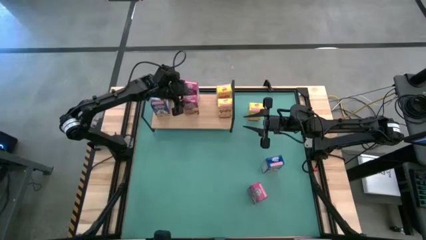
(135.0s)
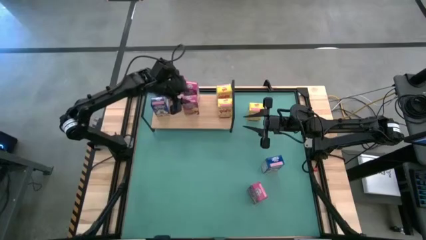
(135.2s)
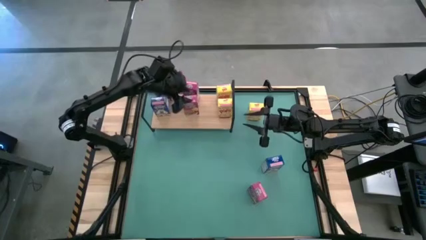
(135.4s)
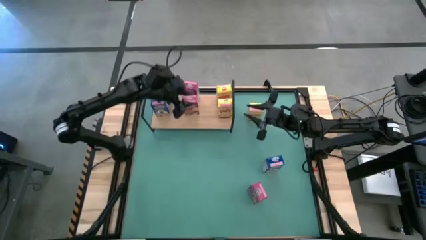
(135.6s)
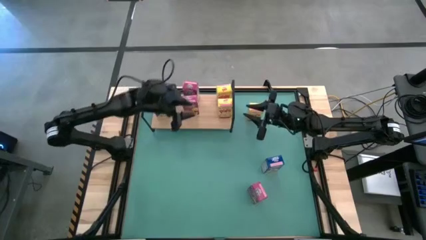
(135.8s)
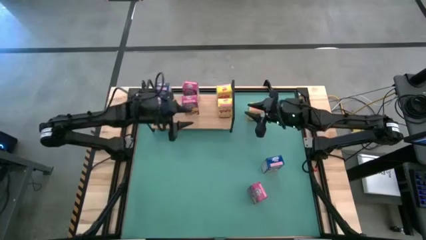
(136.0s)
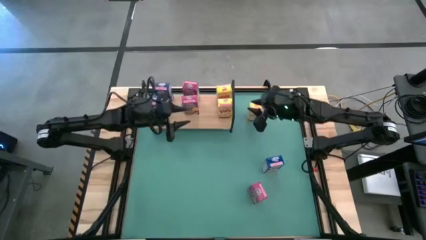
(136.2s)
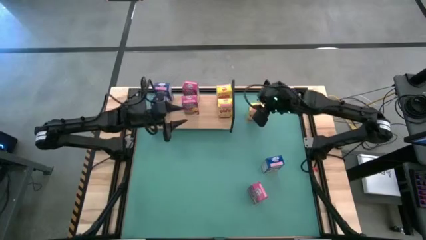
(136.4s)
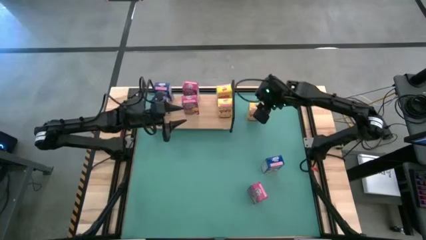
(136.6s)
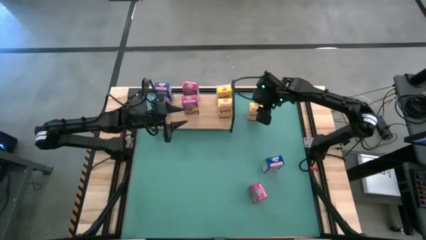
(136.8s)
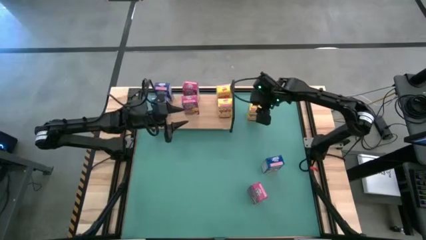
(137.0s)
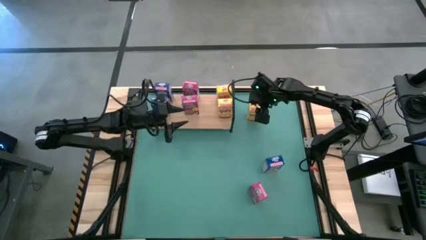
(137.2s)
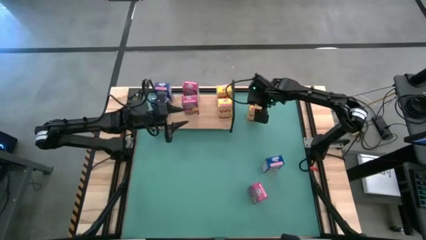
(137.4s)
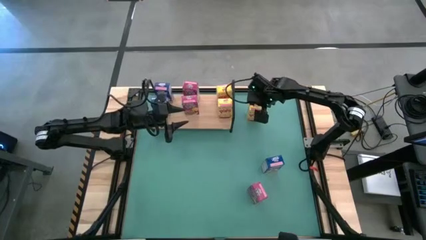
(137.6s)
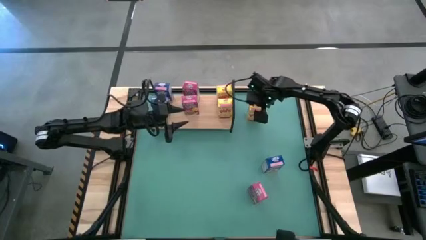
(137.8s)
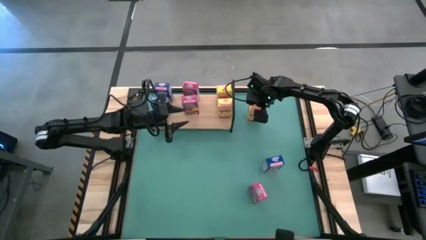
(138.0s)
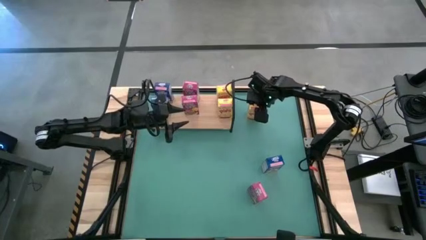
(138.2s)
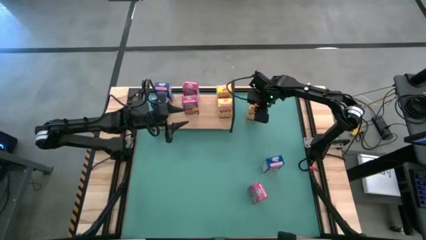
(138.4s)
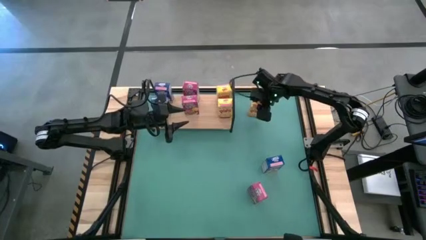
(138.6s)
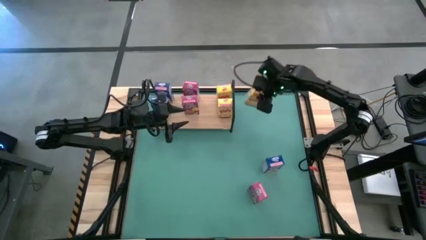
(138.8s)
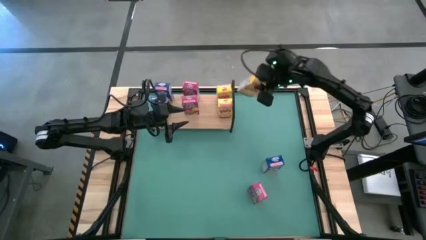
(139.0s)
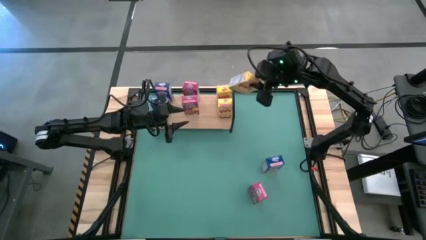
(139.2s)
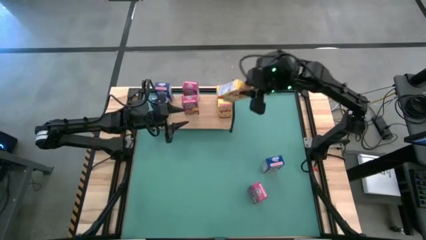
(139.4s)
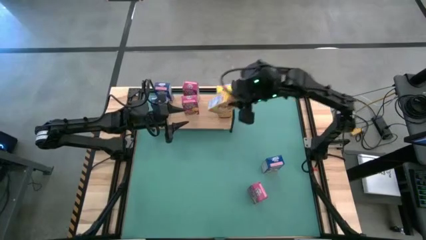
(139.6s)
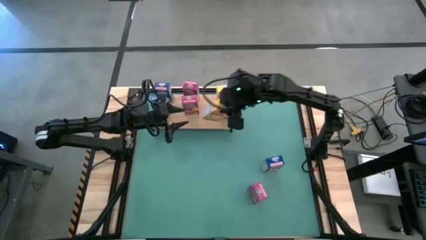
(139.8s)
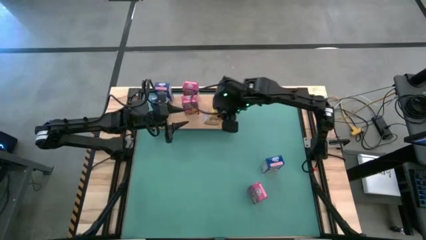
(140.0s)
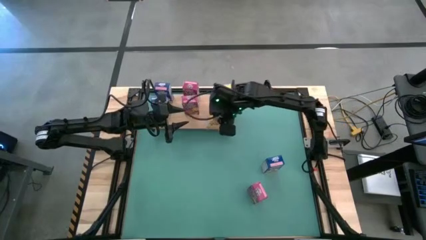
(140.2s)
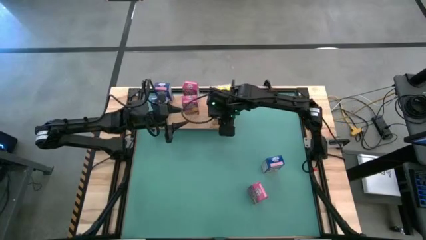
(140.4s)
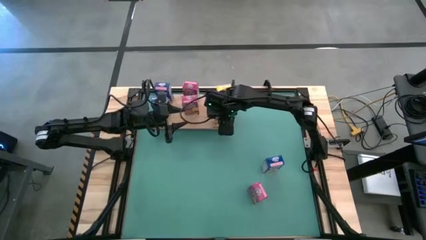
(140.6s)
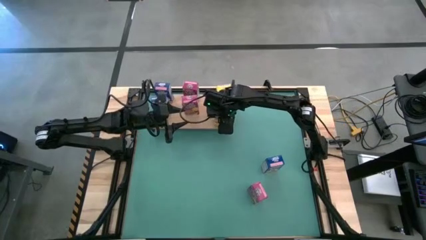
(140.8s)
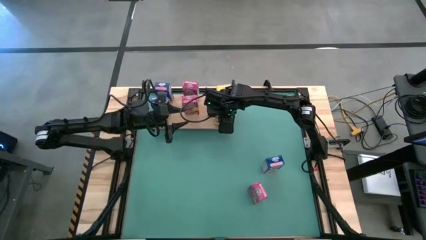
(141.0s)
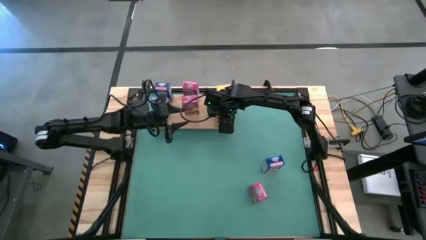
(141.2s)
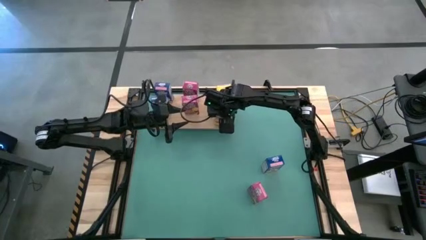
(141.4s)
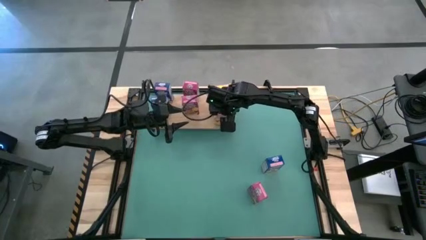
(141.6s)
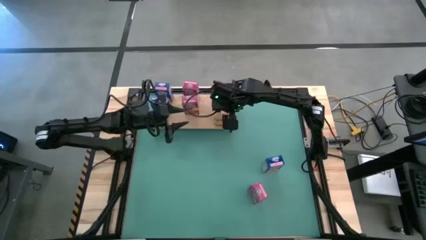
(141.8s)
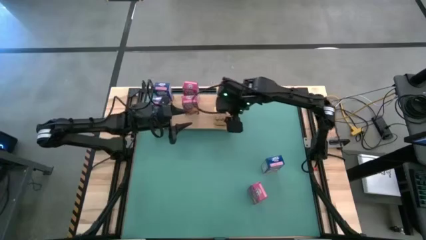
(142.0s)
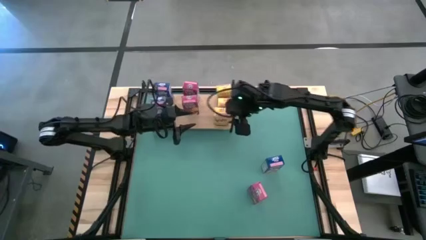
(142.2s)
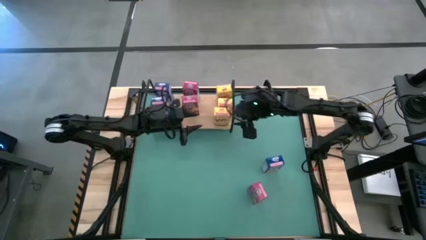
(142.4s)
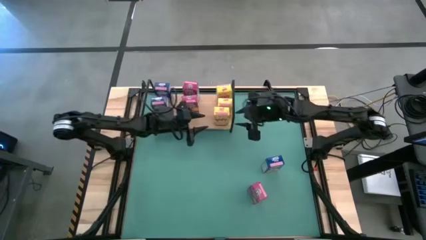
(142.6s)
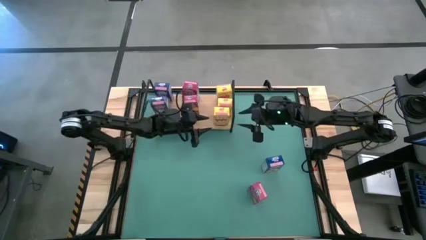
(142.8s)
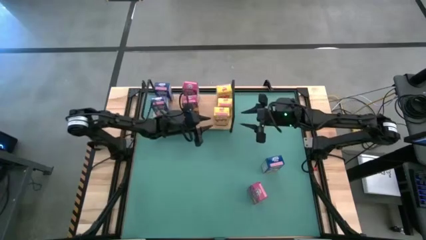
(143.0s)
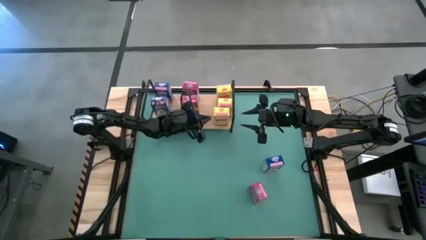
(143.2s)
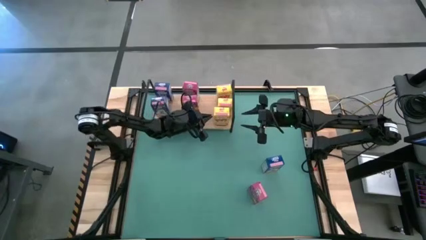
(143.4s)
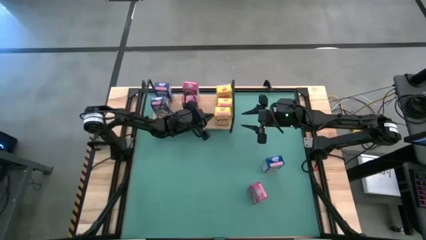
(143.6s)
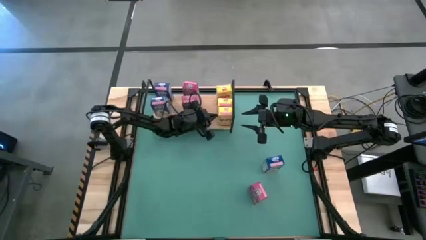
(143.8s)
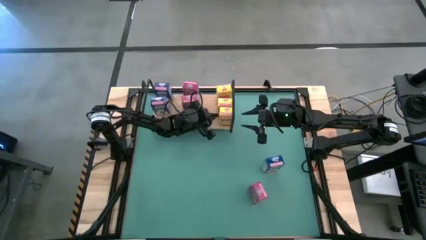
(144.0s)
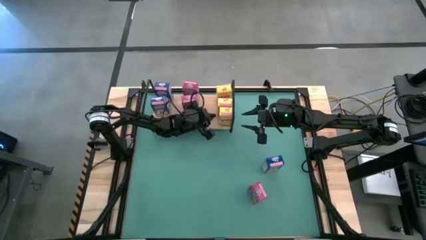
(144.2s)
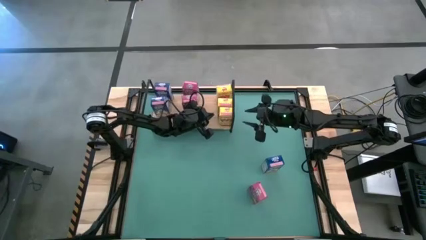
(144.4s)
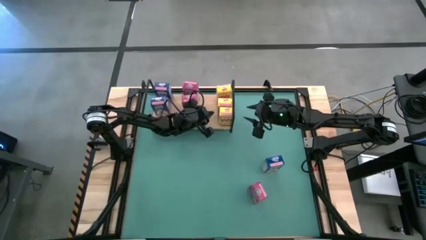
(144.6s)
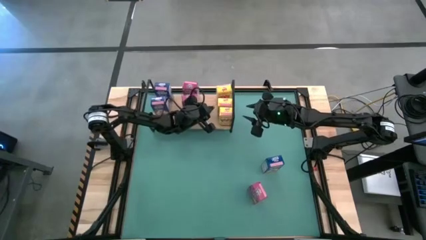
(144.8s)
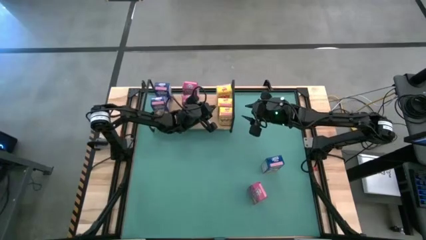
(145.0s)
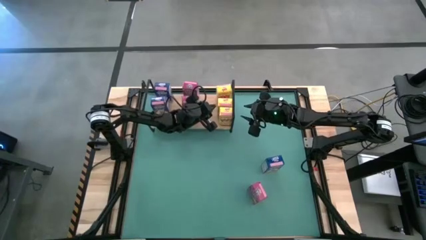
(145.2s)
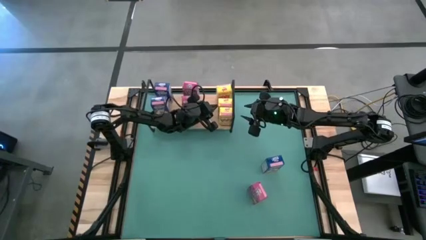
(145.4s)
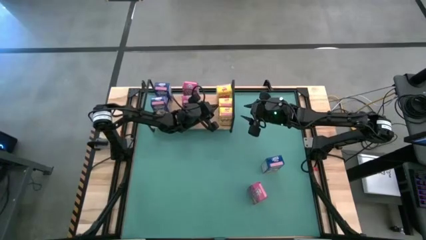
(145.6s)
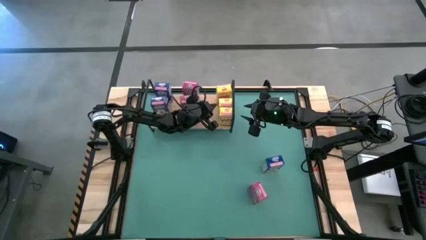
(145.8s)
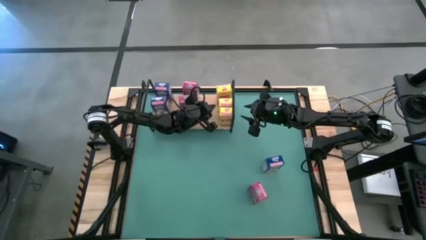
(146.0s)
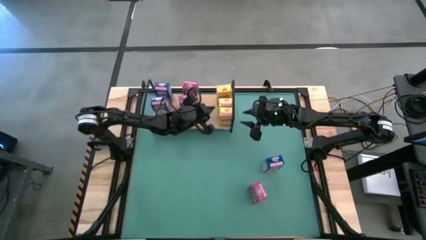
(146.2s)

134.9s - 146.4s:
Task: Stack cereal on shelf
Put the yellow cereal box on the shelf

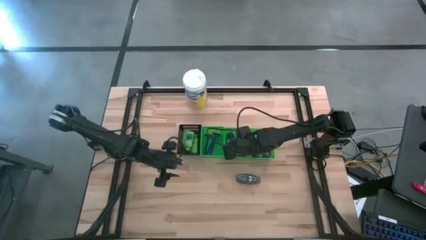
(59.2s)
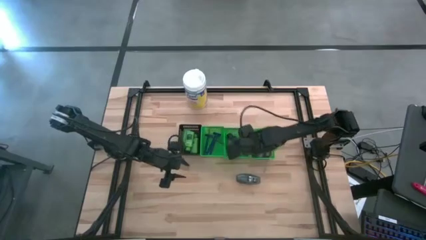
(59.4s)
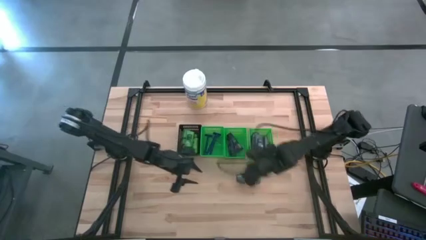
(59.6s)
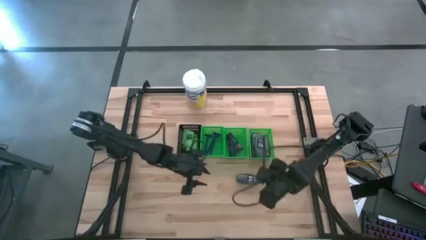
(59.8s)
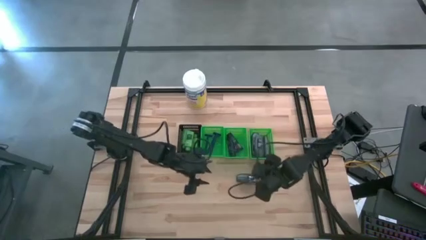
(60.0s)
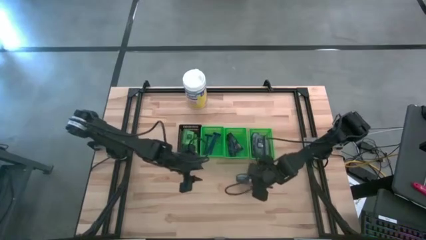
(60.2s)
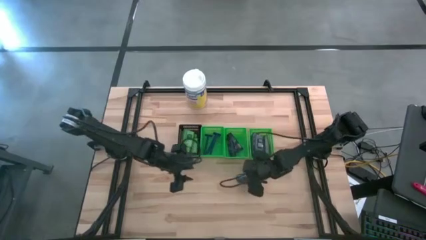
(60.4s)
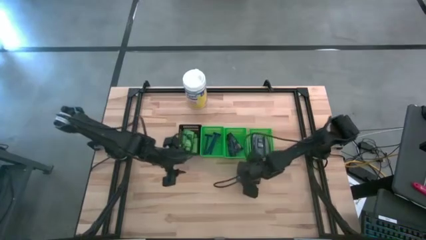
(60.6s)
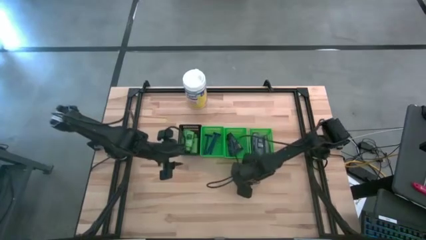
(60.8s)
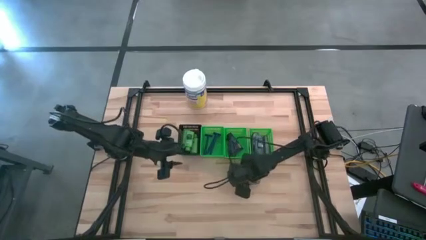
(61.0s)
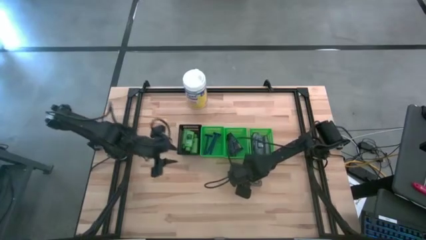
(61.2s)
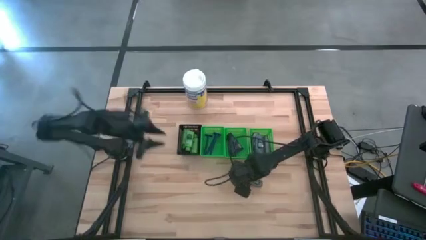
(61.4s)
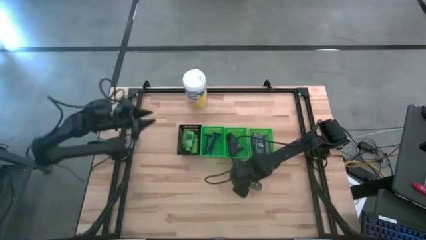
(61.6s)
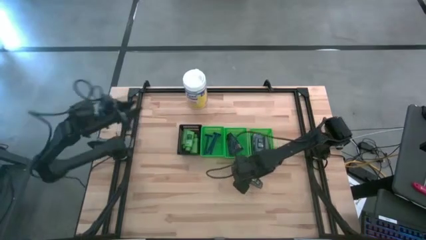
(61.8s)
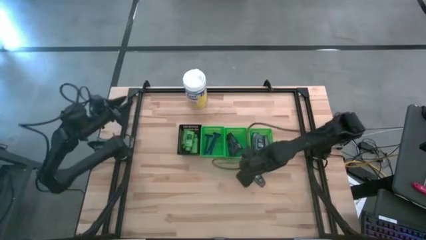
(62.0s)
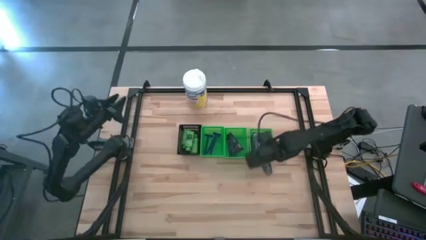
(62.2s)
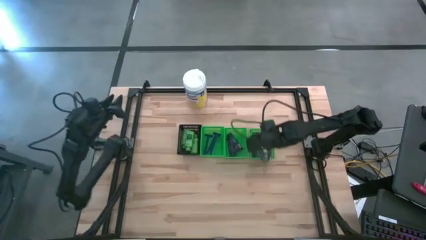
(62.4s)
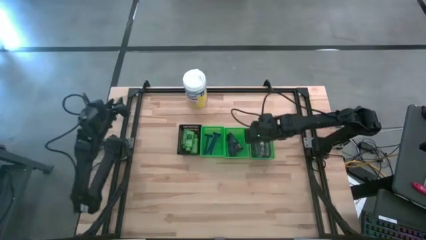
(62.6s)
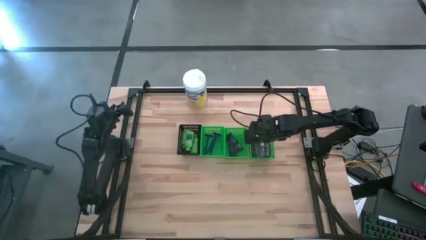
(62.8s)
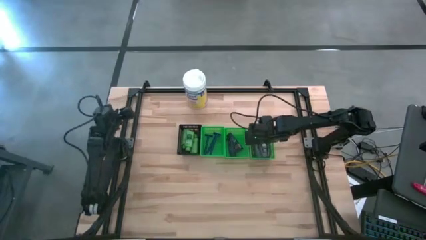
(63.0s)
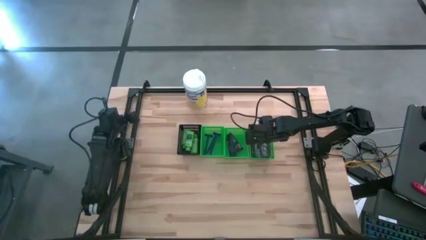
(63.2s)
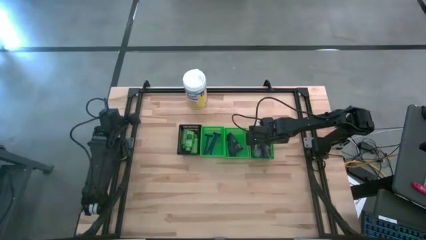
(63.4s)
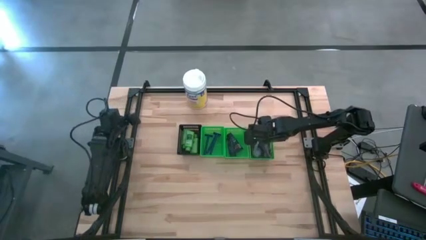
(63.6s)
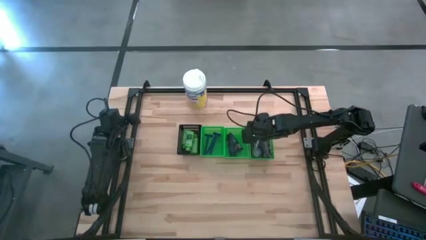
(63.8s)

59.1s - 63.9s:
Task: Pick & Place Travel size toiletries
Put the deodorant into the right green bin
